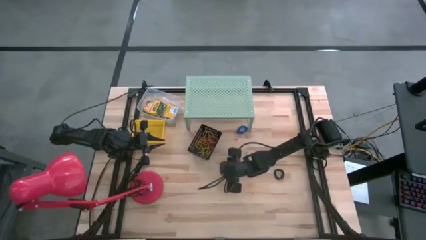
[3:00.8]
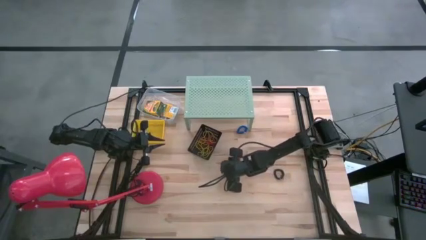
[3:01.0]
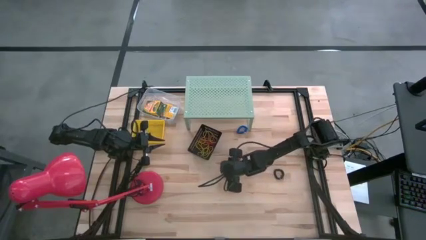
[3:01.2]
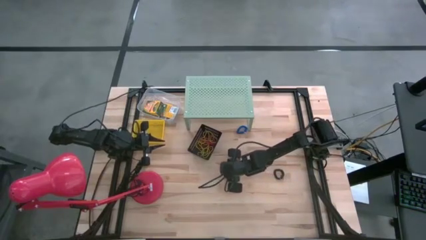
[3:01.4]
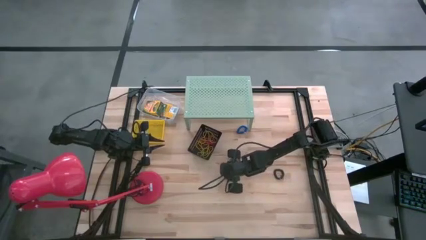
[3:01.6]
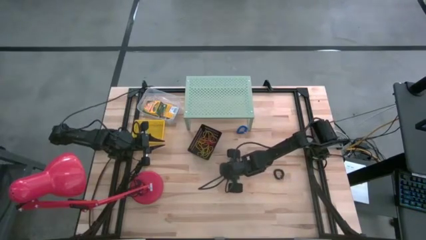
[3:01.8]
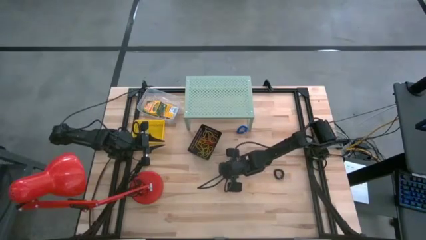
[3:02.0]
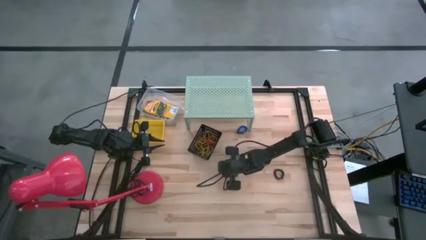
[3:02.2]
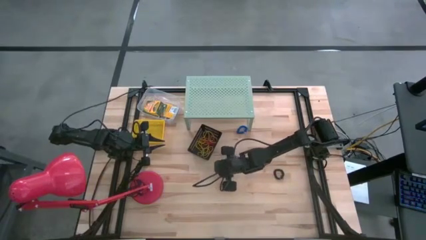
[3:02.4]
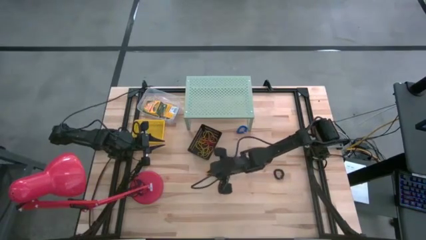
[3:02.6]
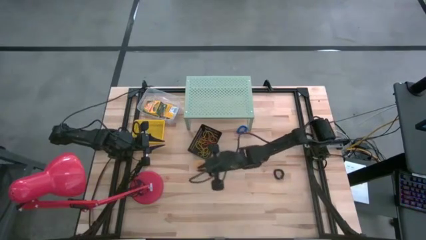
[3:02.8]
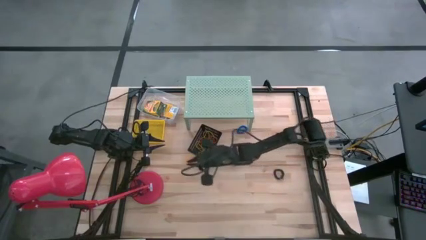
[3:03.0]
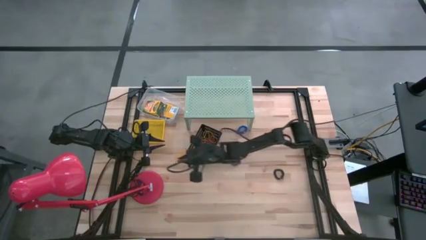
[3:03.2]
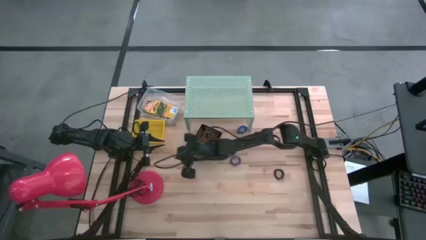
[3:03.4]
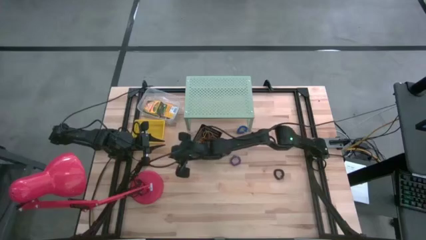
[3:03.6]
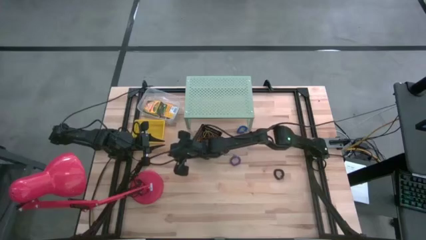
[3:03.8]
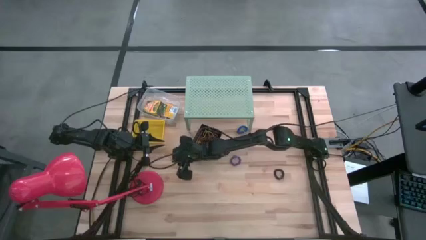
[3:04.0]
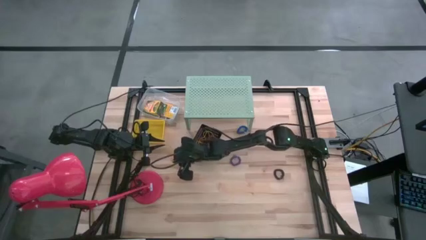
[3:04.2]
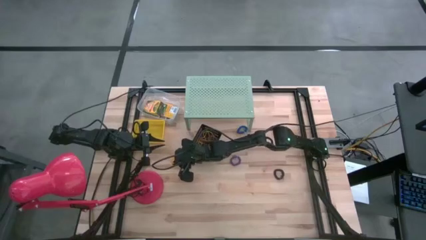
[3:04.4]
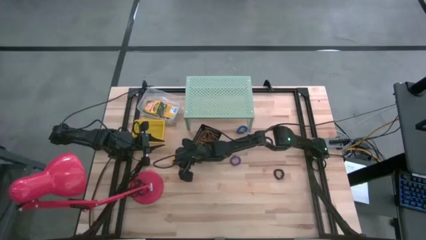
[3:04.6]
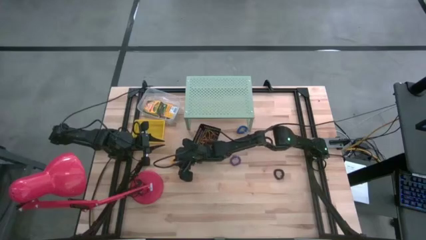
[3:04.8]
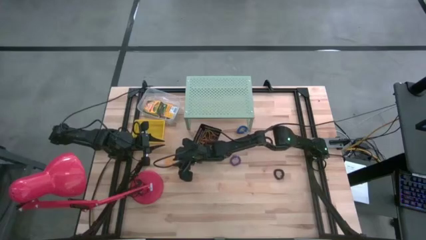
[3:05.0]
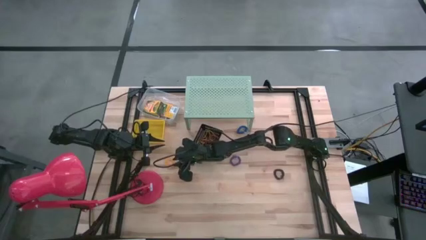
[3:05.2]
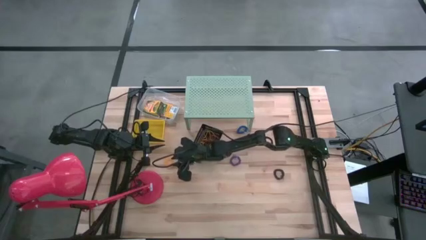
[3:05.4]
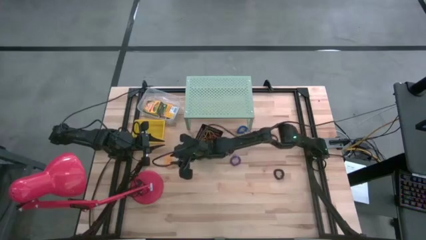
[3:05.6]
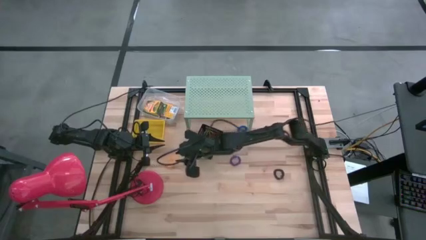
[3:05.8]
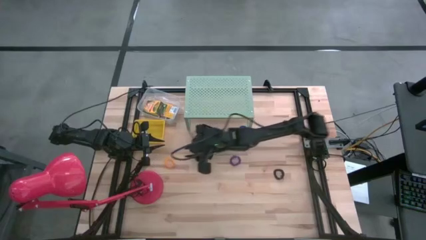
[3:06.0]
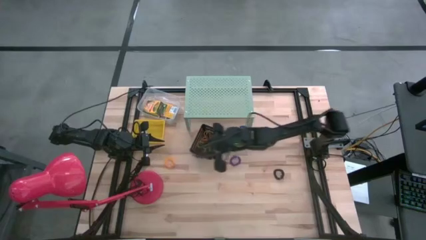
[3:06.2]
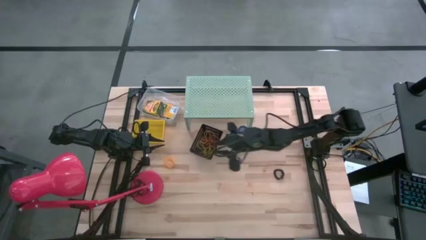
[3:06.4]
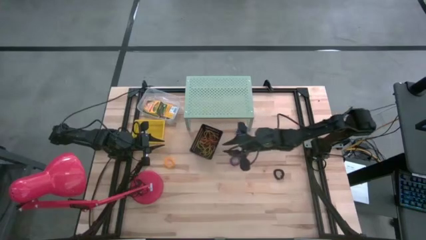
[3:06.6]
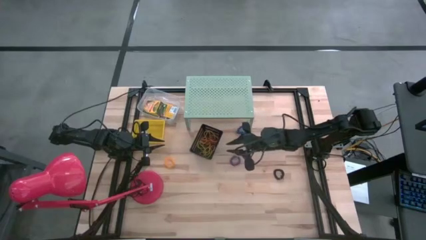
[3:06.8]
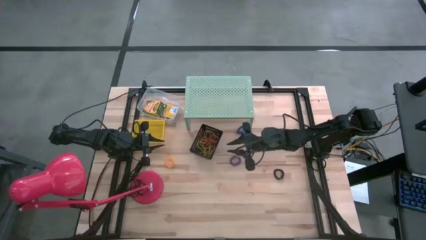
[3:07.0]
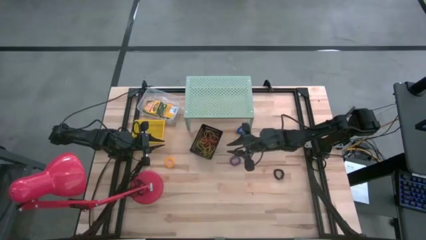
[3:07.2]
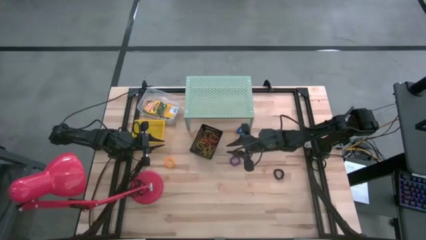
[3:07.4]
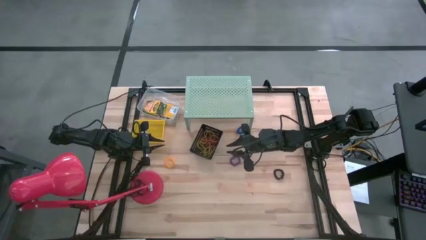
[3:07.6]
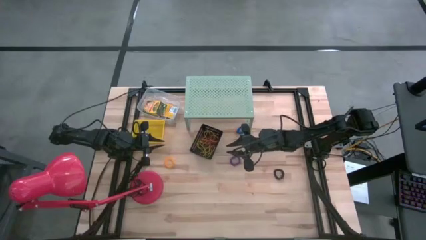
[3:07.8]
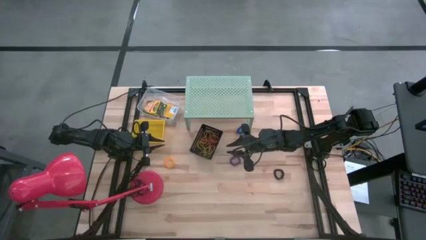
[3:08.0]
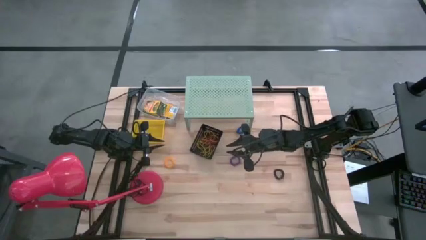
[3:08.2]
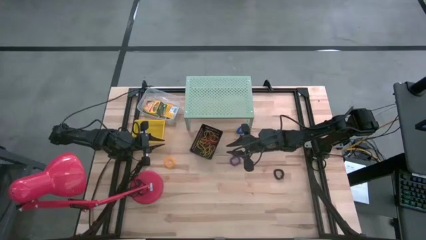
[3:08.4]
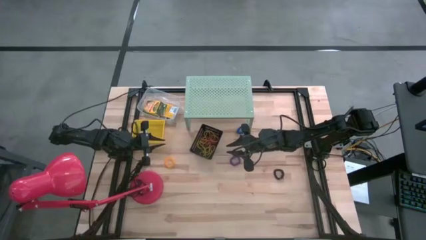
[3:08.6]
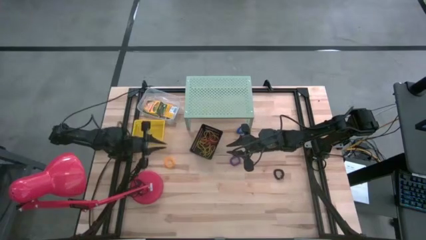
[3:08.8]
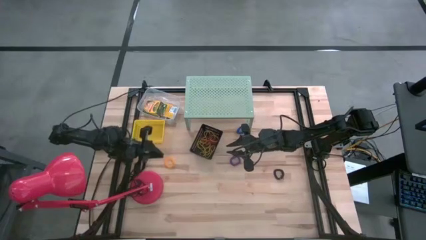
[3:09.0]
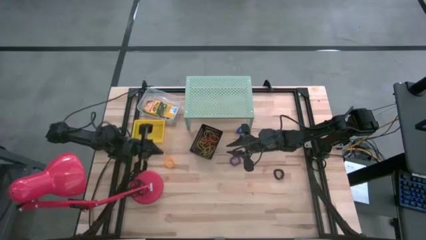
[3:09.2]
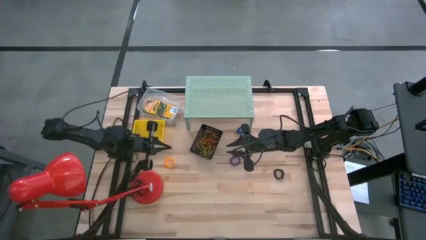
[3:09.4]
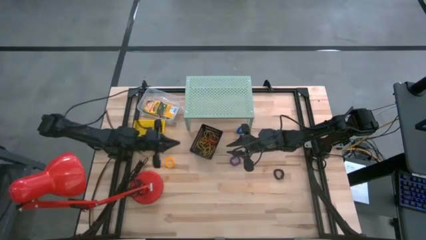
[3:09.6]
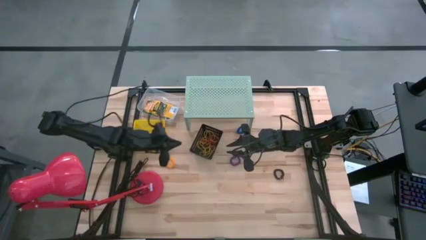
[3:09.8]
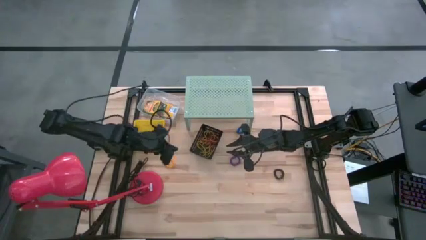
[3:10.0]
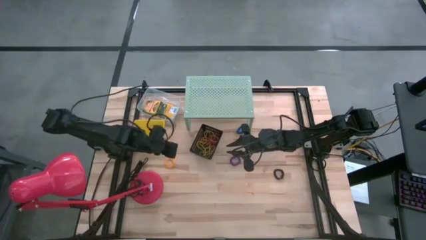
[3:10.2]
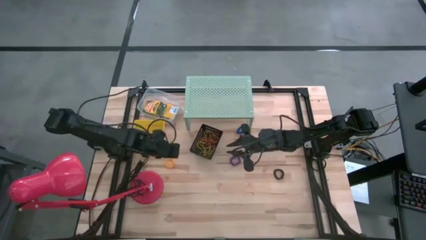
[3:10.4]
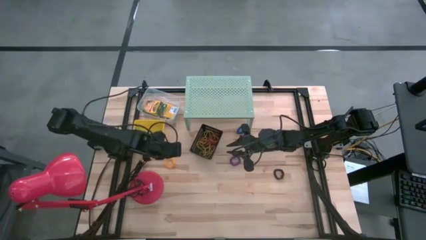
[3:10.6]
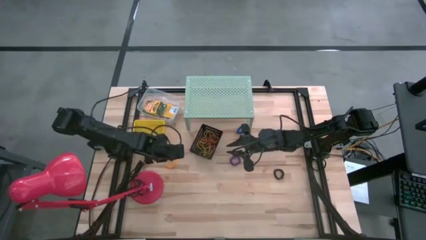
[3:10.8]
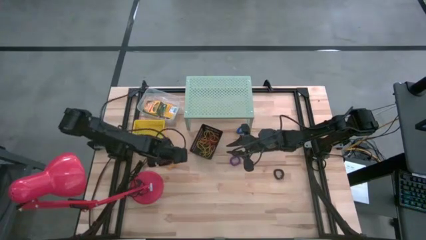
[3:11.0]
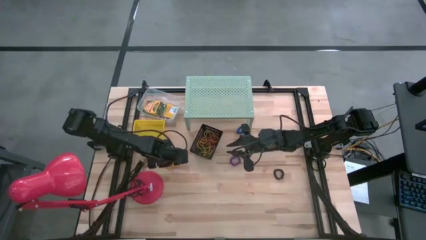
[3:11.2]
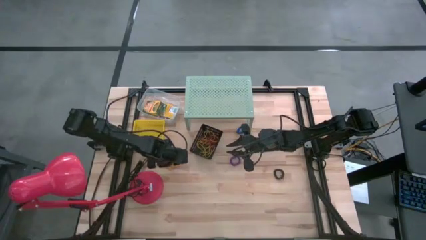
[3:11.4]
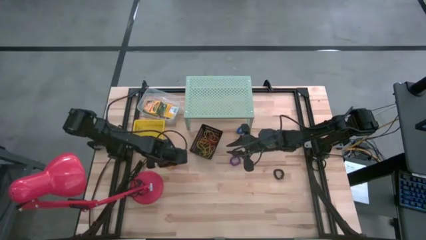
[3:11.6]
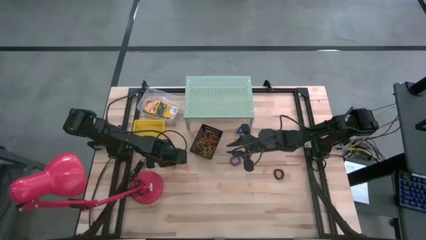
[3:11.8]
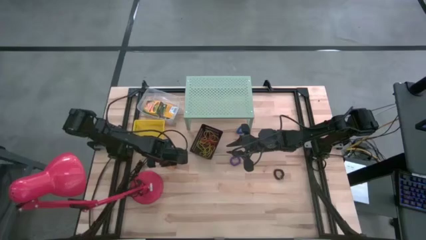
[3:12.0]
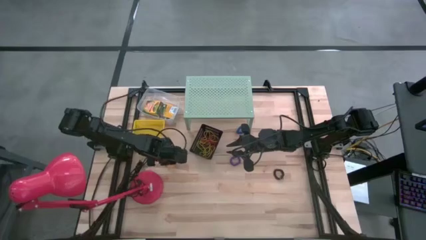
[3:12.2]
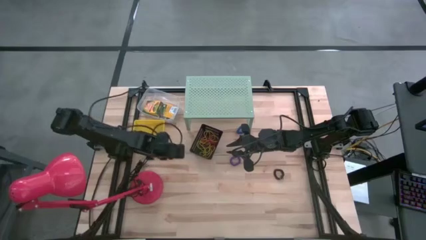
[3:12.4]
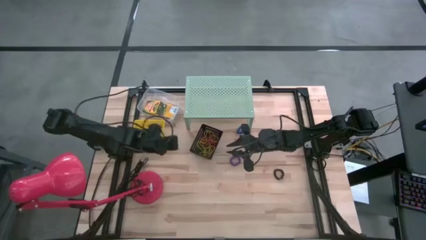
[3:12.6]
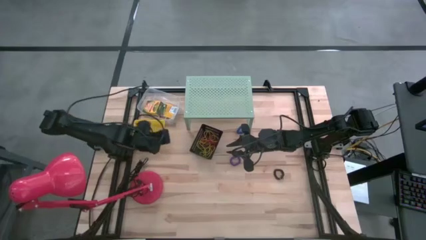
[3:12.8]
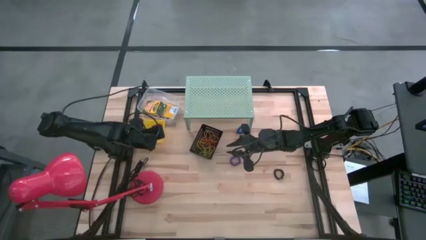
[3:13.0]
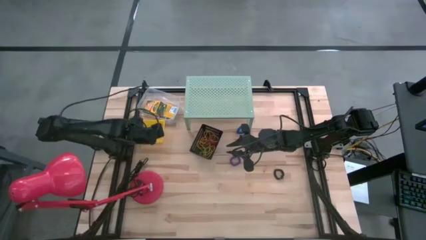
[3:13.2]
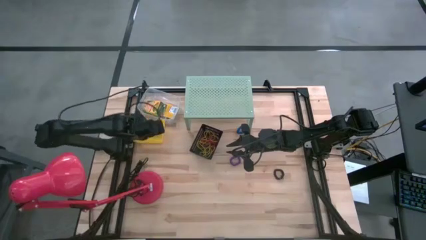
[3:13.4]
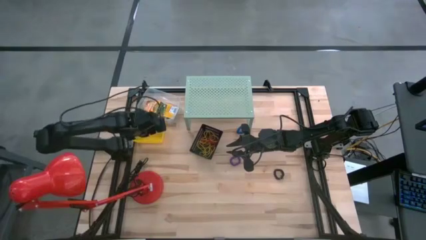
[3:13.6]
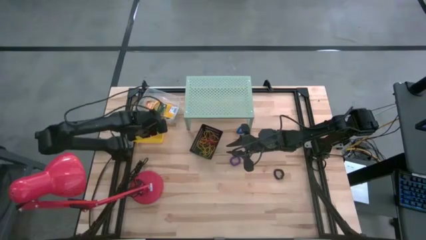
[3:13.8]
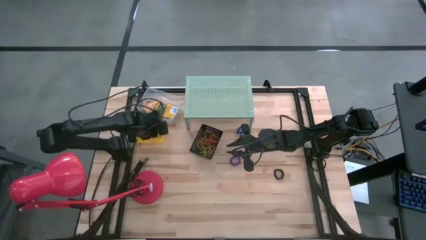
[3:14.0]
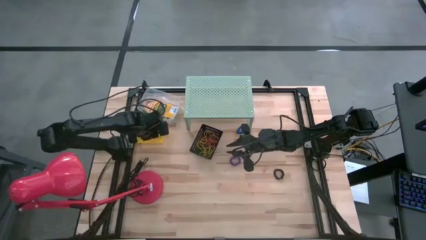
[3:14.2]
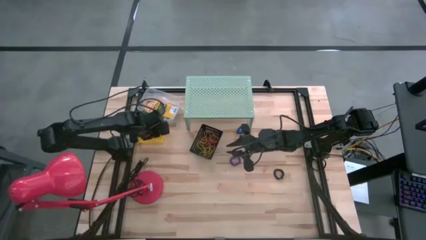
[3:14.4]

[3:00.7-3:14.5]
Task: Pick & Place Office Desk Supplies
Put the yellow spring rubber band into the yellow bin
